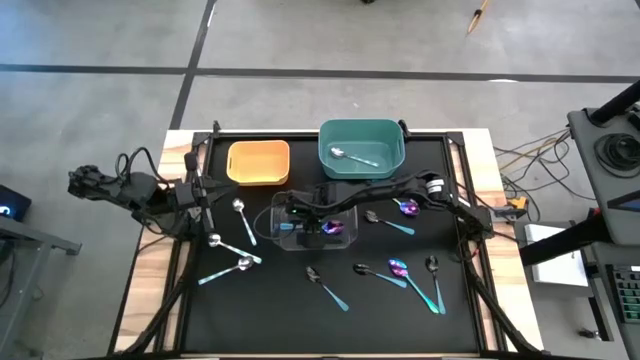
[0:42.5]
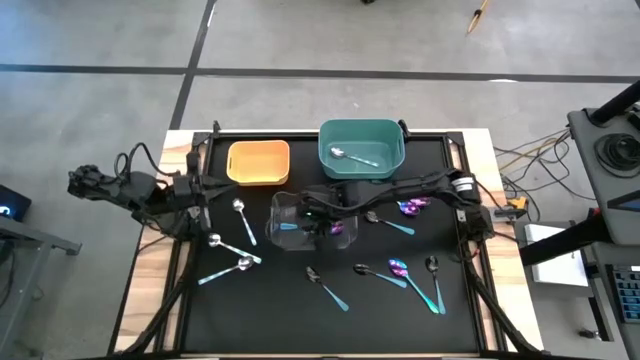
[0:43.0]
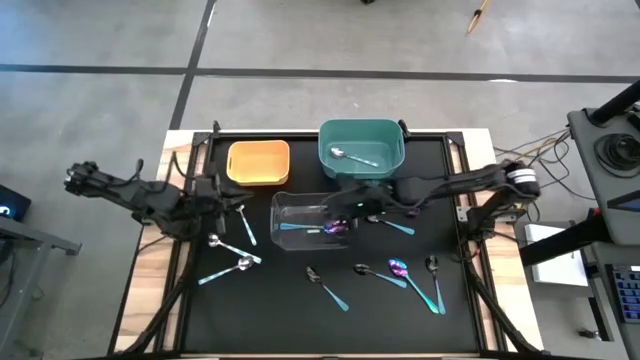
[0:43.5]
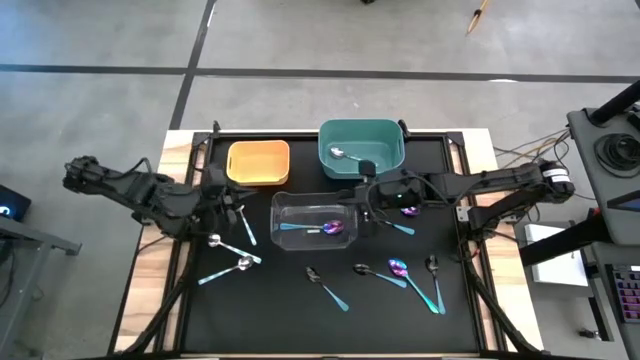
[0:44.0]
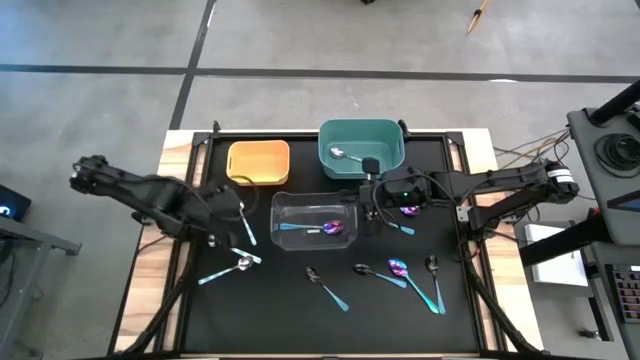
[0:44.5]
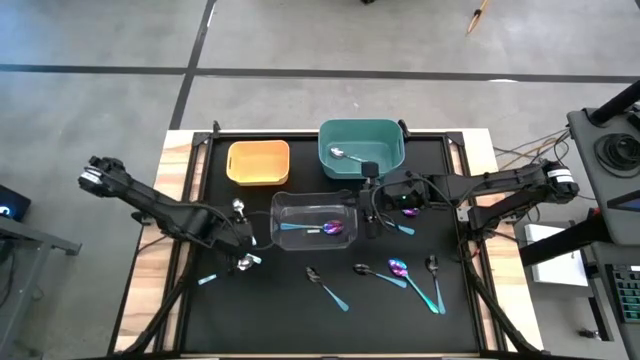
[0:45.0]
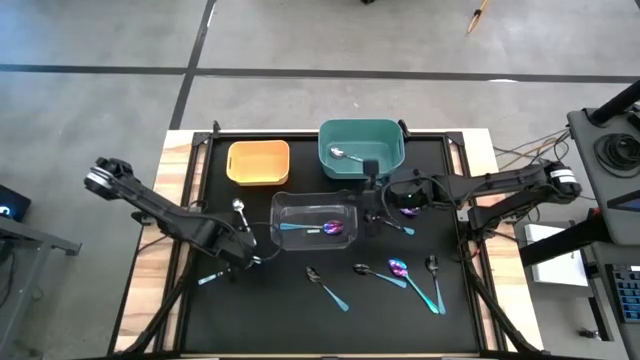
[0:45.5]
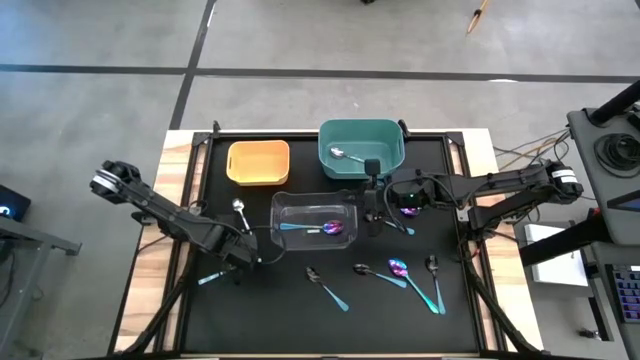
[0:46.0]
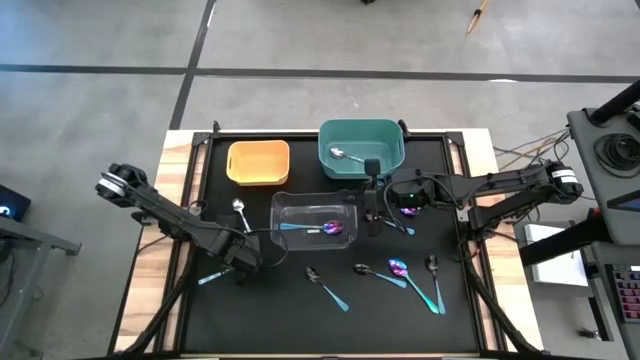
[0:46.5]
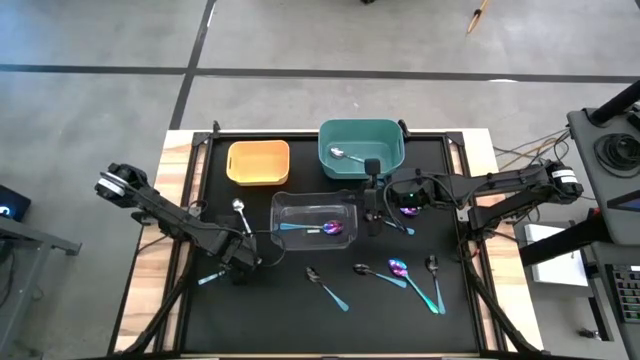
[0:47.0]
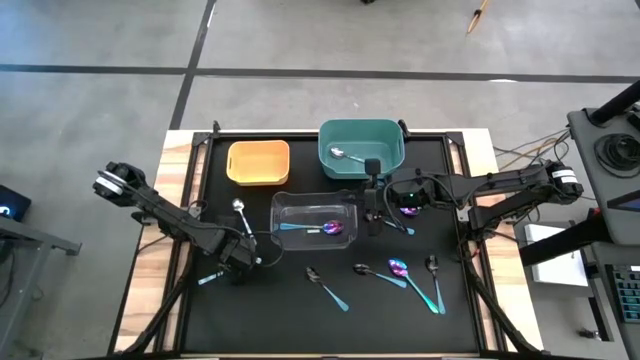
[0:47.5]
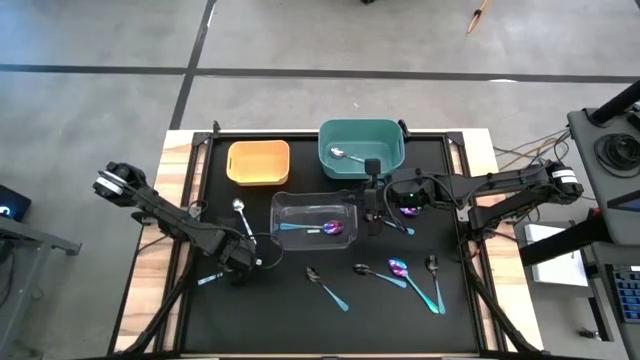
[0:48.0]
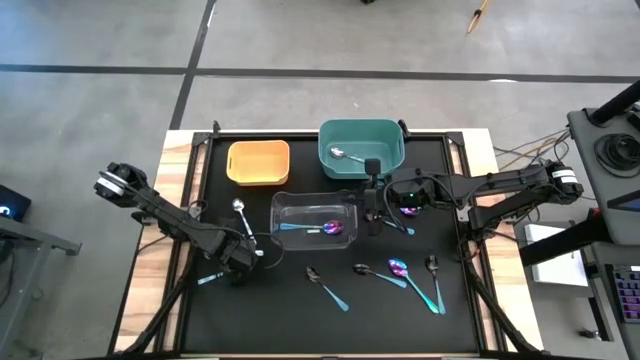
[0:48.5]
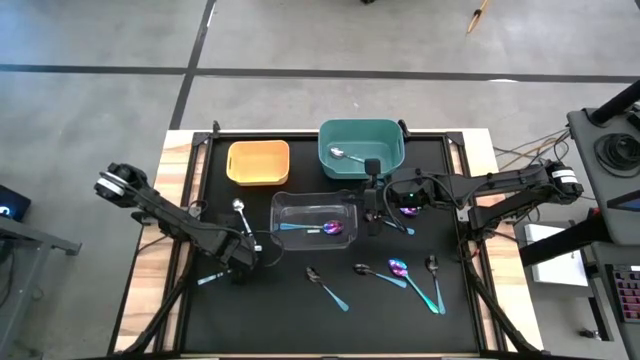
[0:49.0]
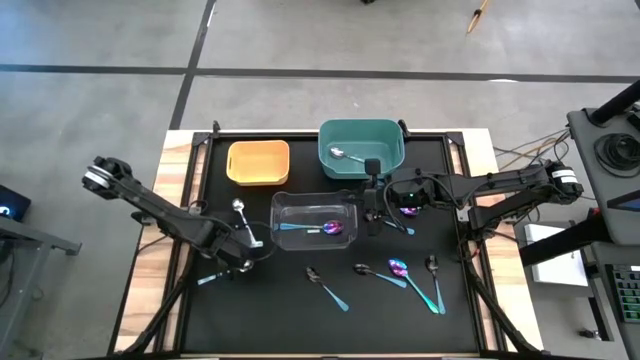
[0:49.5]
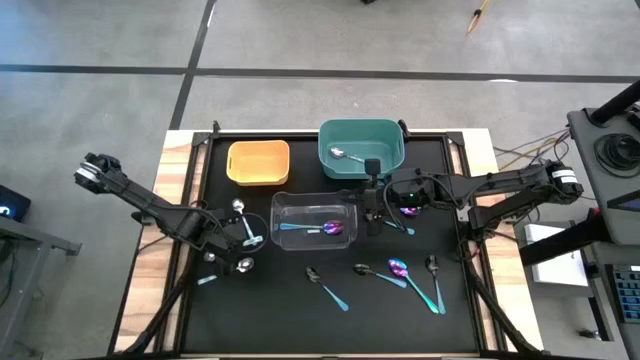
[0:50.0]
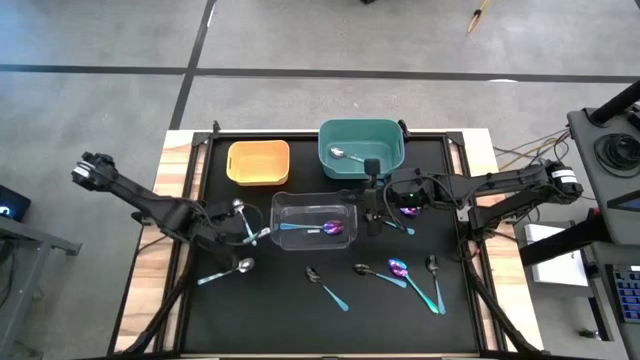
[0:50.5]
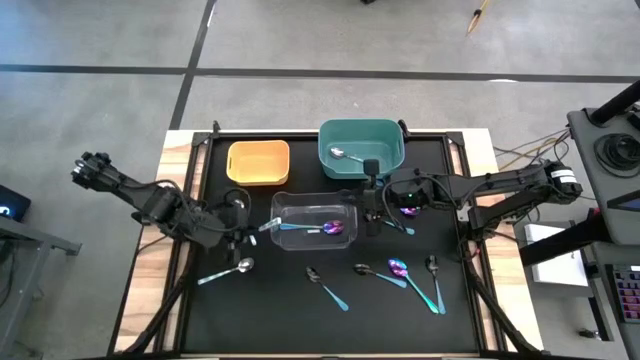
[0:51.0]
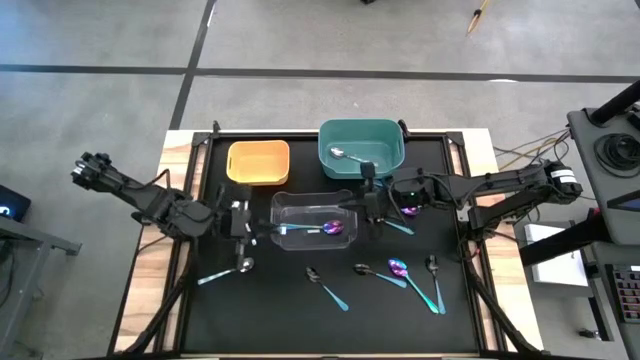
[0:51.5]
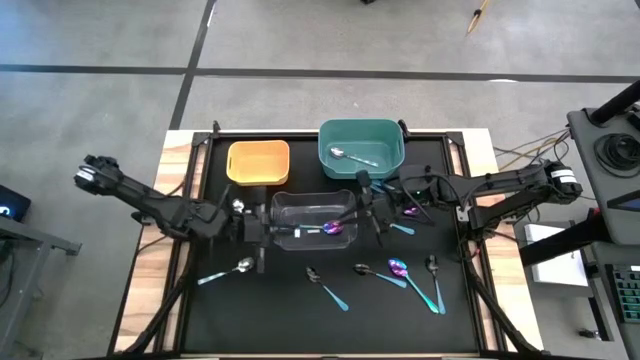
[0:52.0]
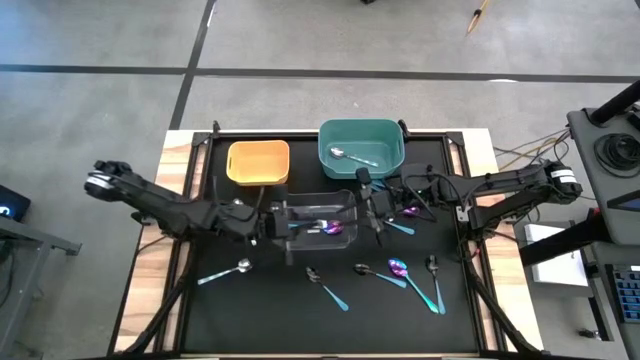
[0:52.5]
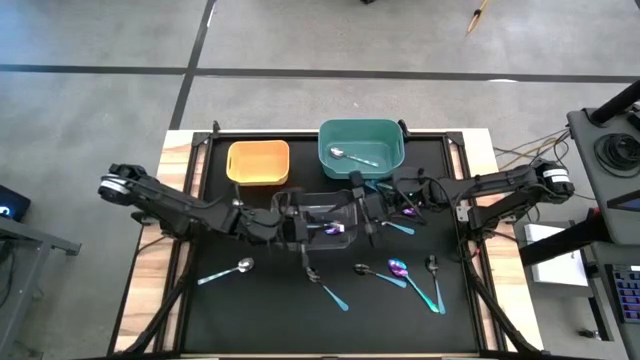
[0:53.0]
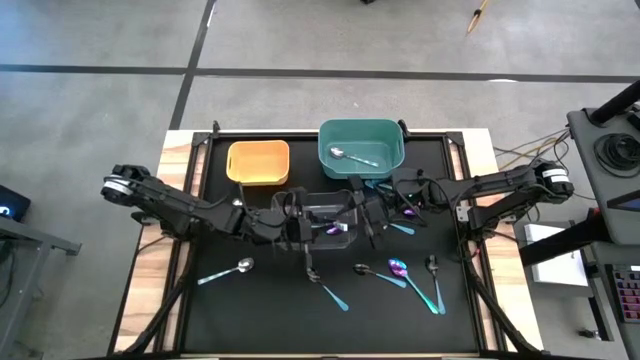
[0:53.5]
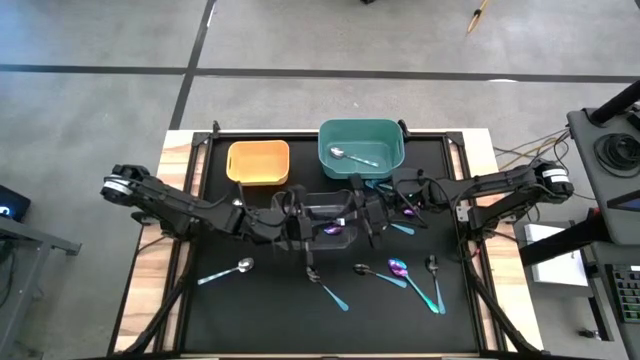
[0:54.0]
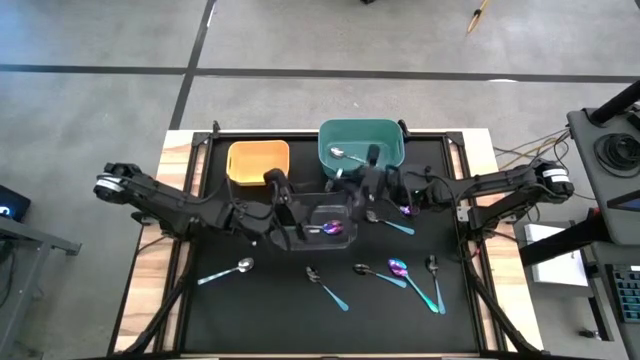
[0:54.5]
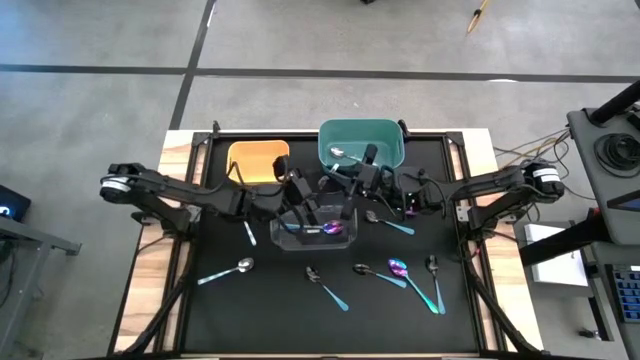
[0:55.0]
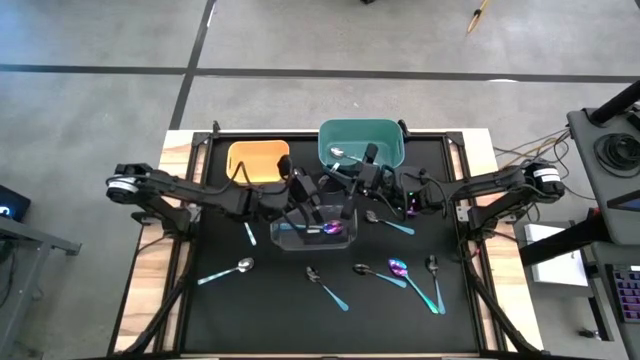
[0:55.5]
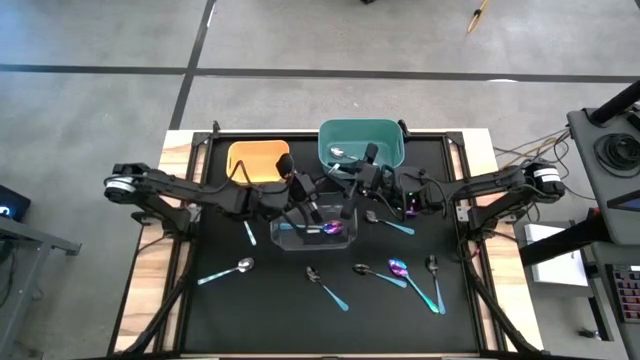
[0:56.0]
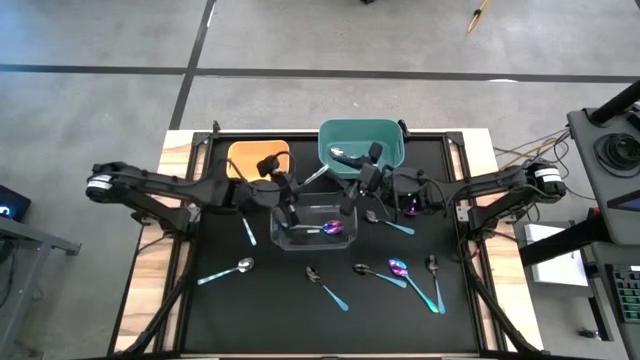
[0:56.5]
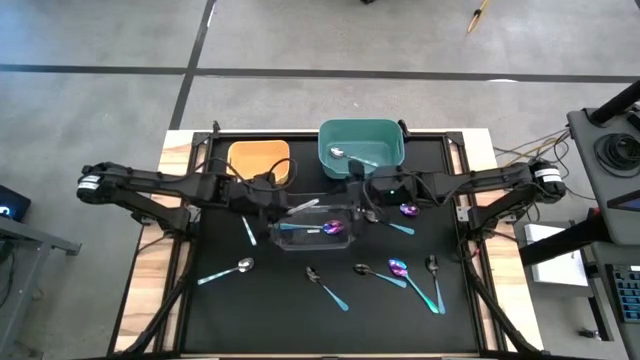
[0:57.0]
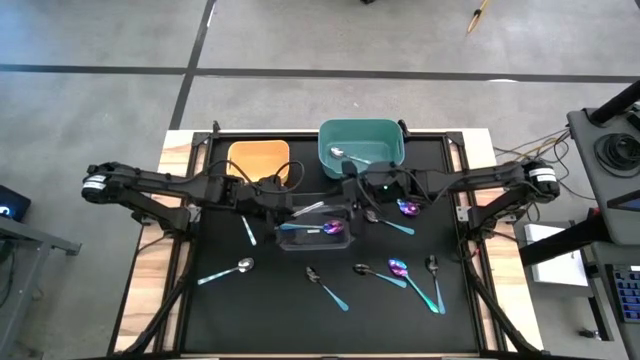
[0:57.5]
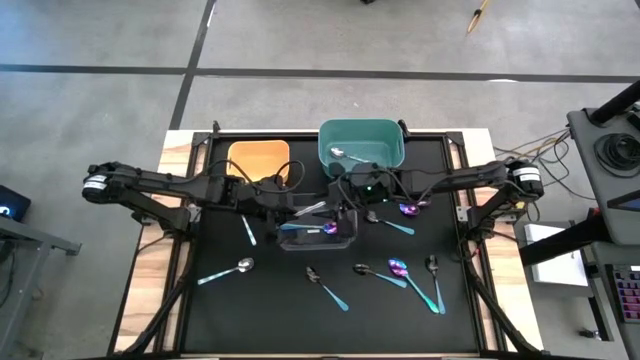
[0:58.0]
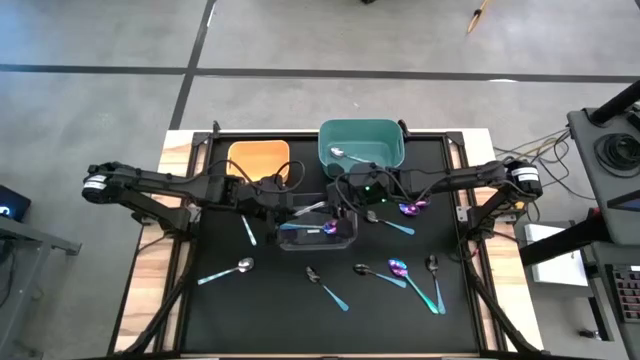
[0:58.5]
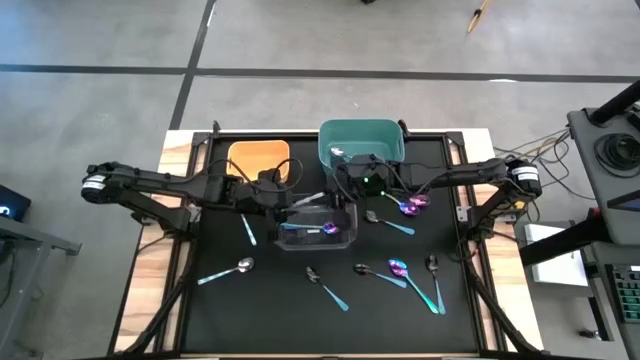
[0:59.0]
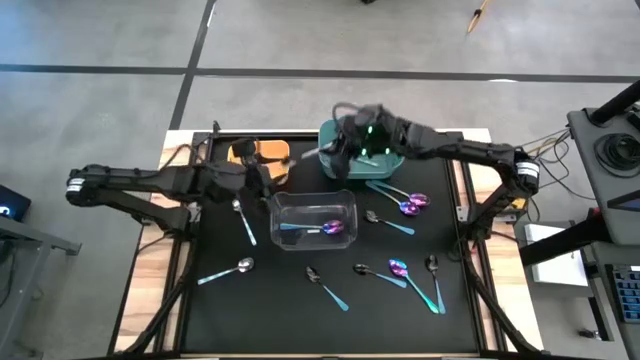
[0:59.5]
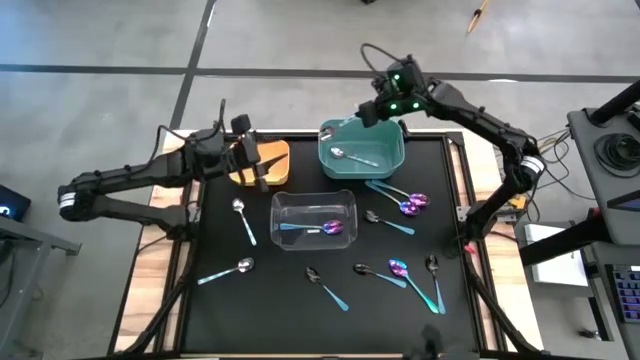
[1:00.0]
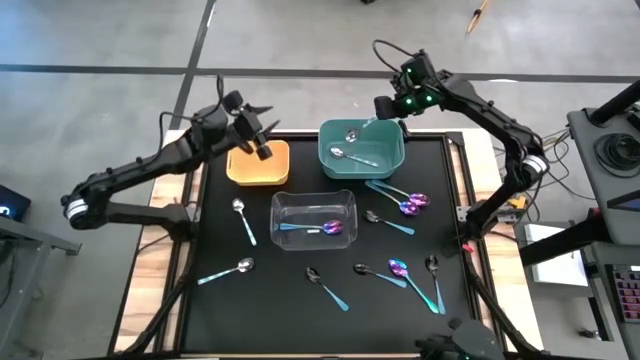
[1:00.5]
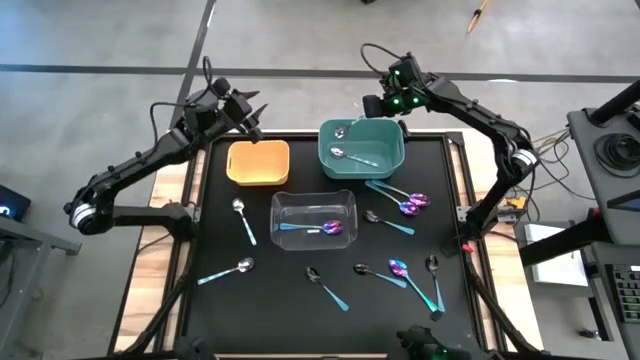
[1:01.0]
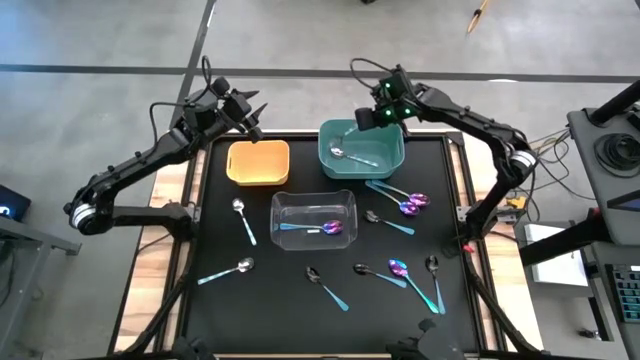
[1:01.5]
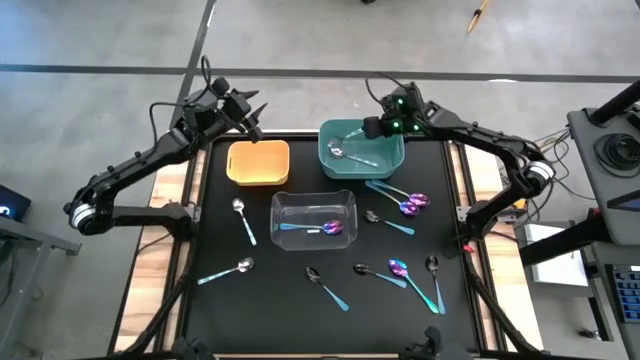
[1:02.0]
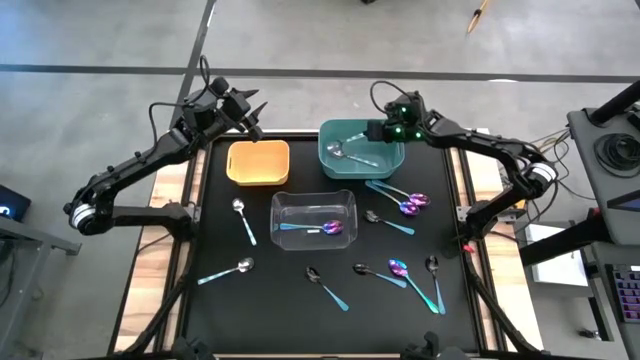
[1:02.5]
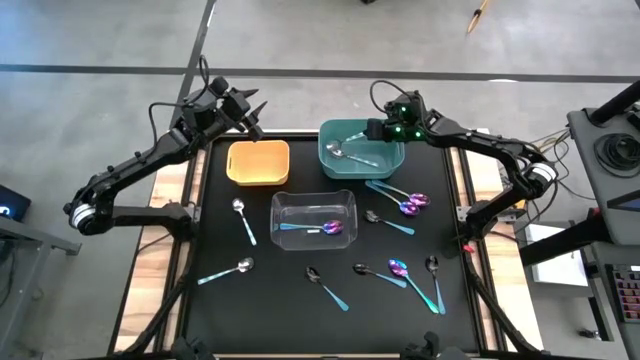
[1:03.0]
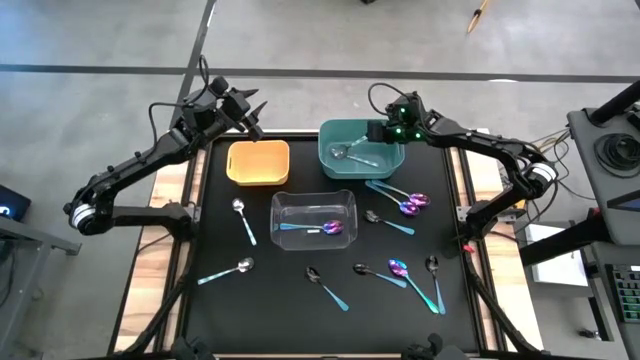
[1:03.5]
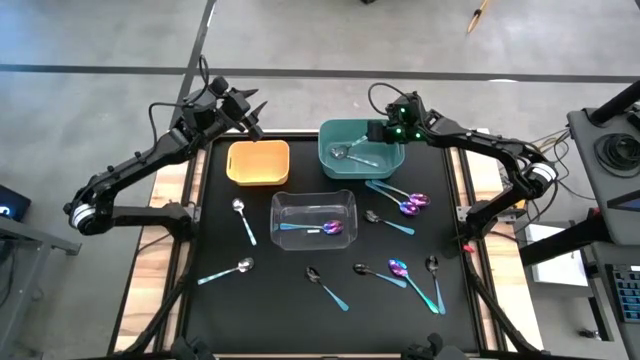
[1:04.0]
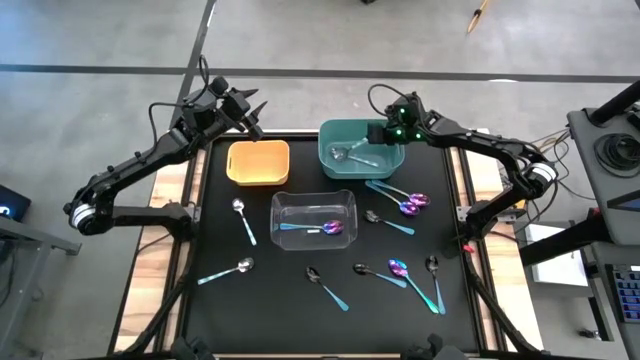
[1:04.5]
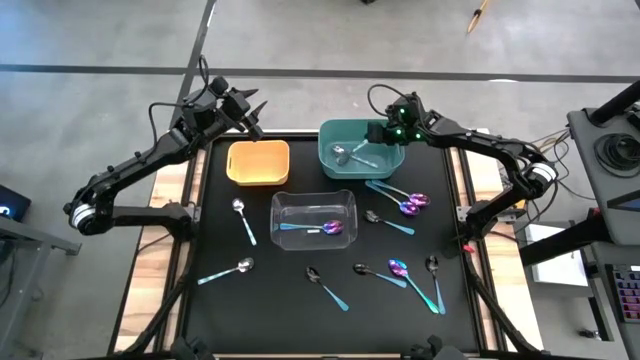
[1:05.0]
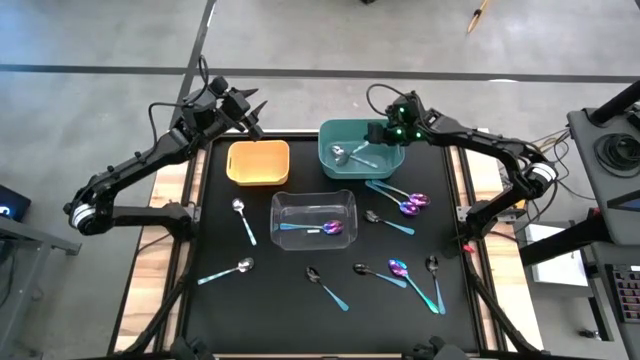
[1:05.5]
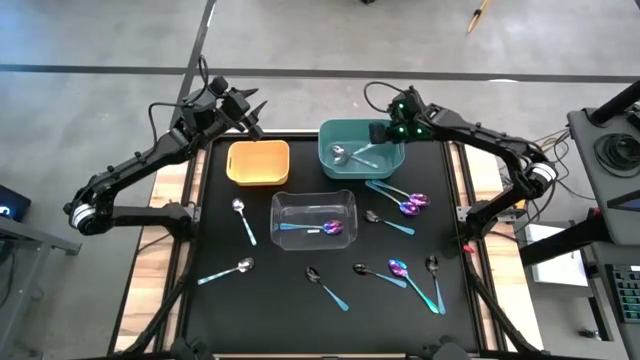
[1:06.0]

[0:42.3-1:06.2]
Task: Sort silverware by color (type)
Put the blue patterned spoon into the green bin
